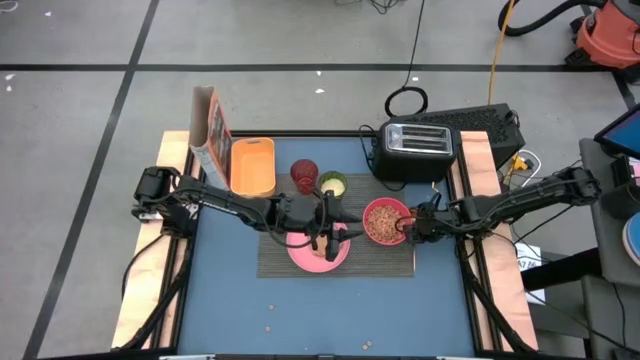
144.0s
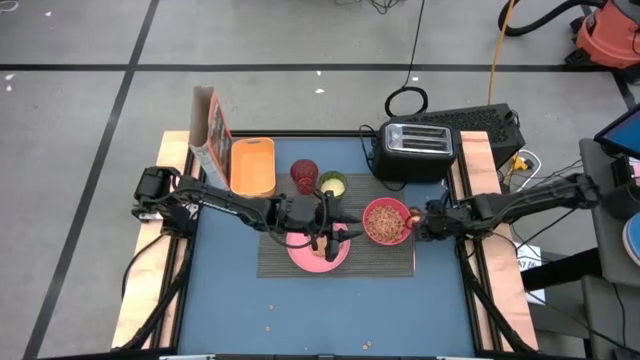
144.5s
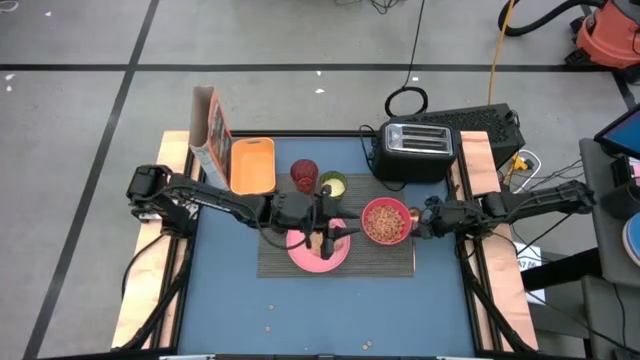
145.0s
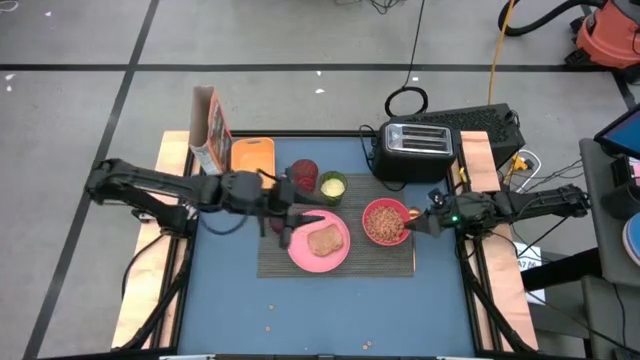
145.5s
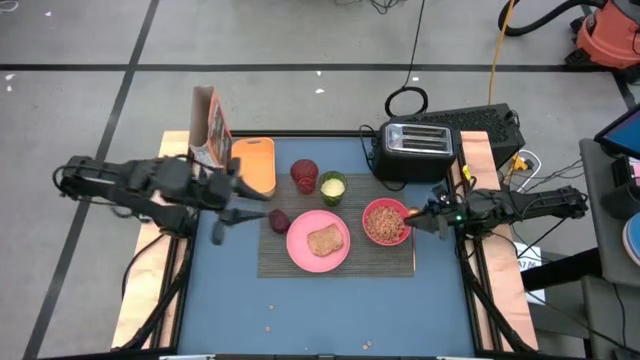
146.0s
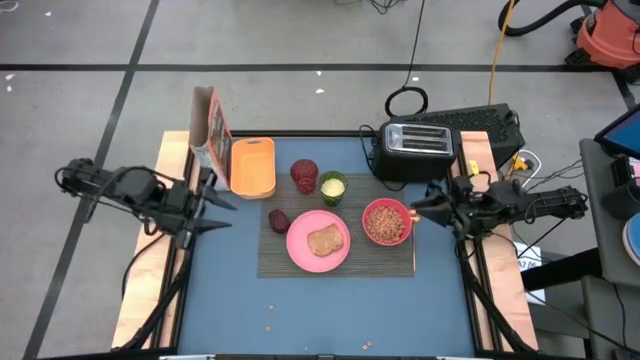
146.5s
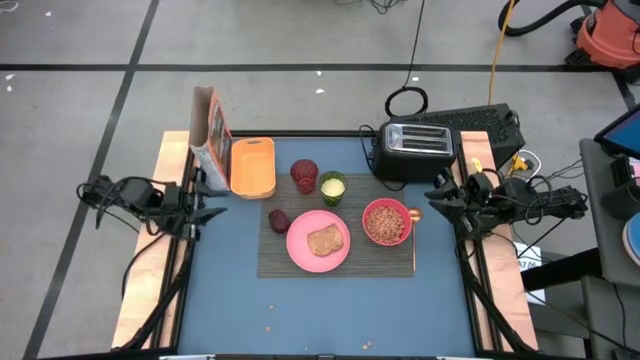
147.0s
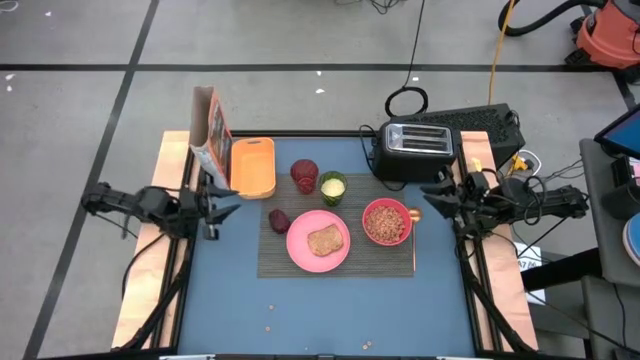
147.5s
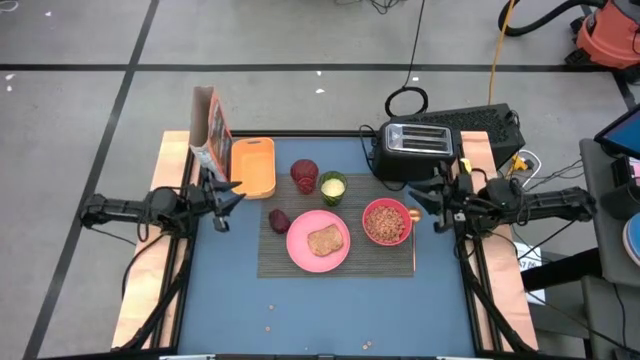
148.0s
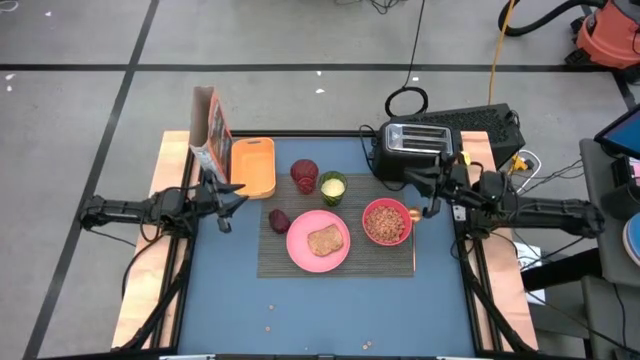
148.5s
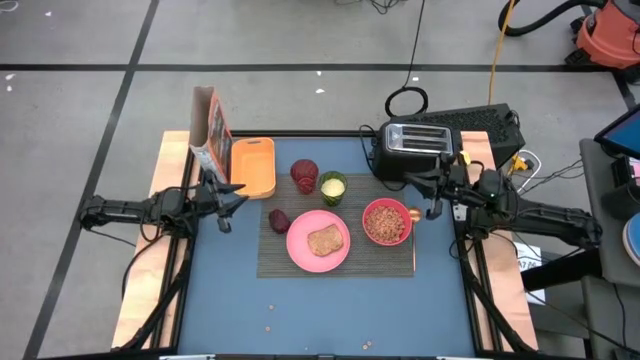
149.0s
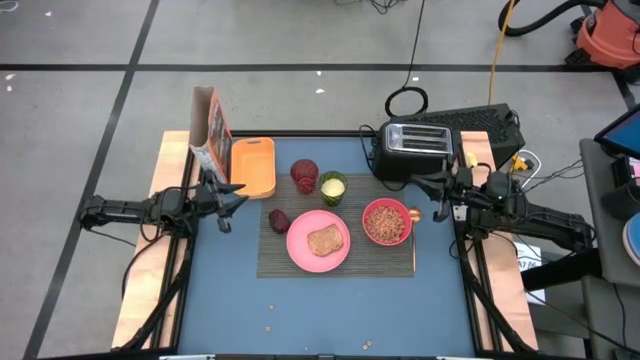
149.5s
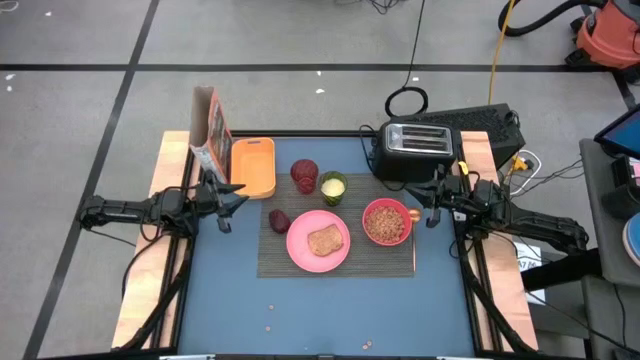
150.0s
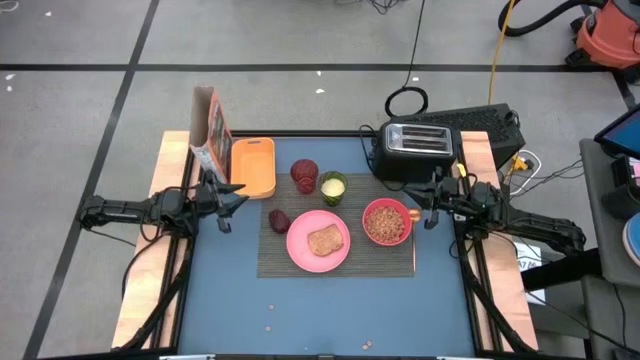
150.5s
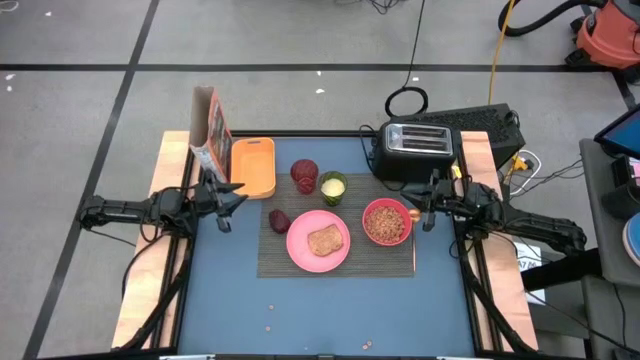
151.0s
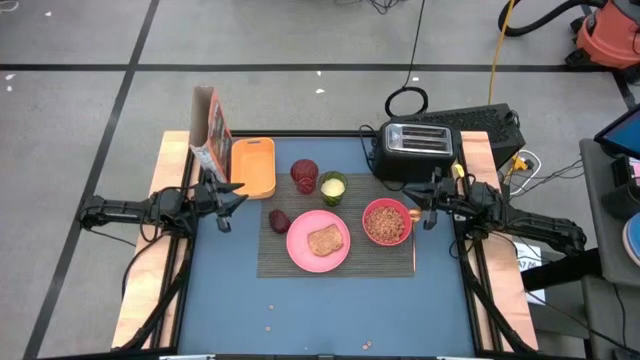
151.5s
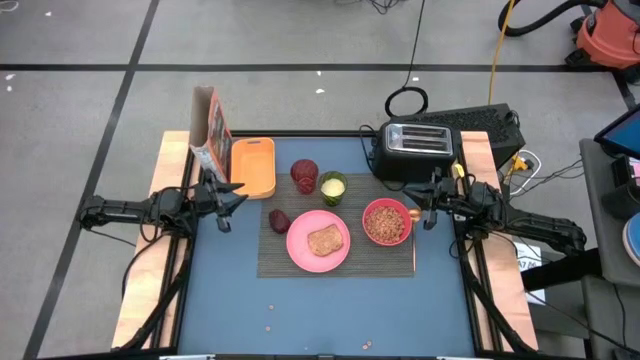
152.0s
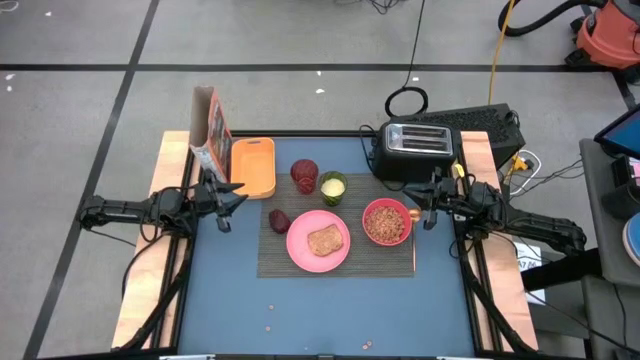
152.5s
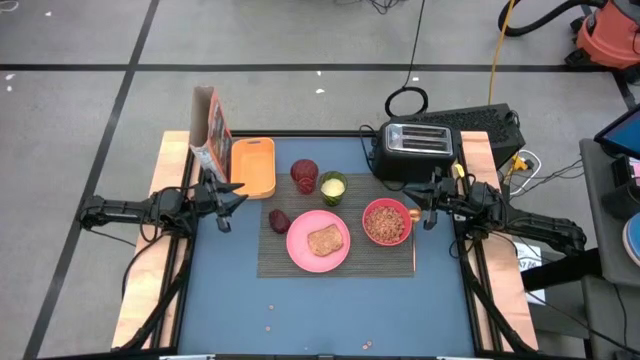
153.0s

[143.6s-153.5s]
Task: Arrange a breakfast setting
Return to Home Position

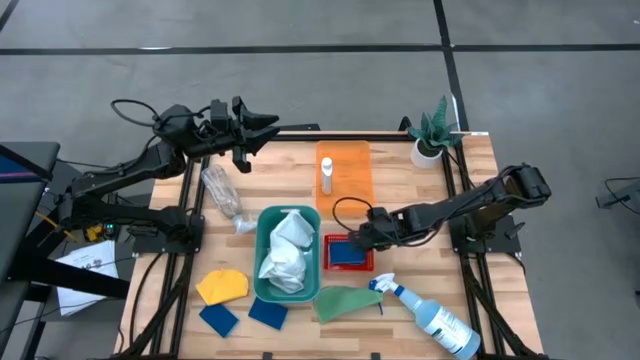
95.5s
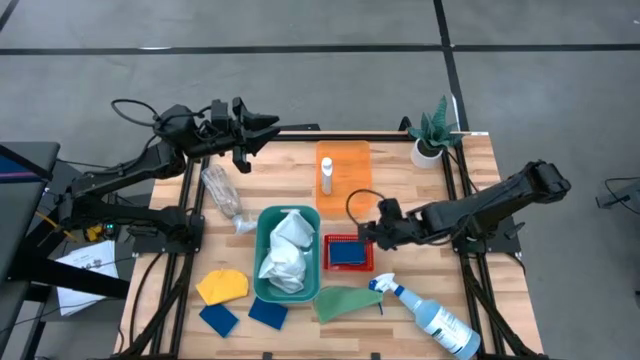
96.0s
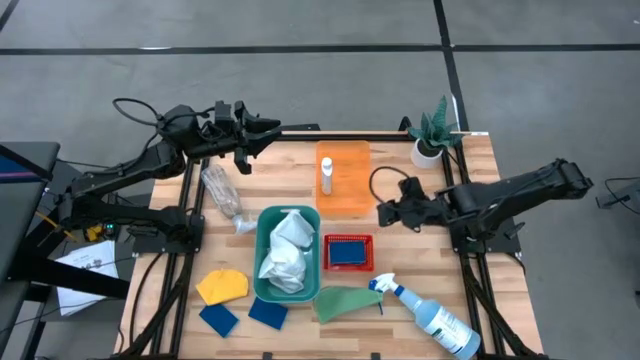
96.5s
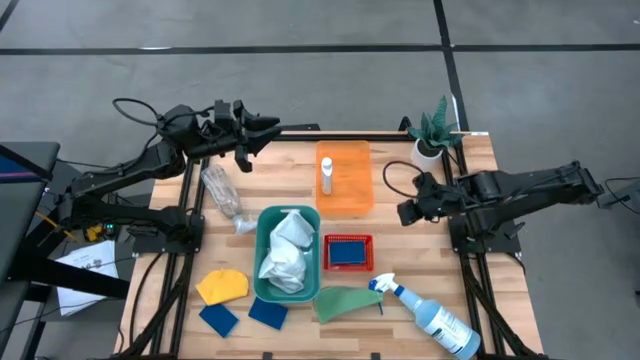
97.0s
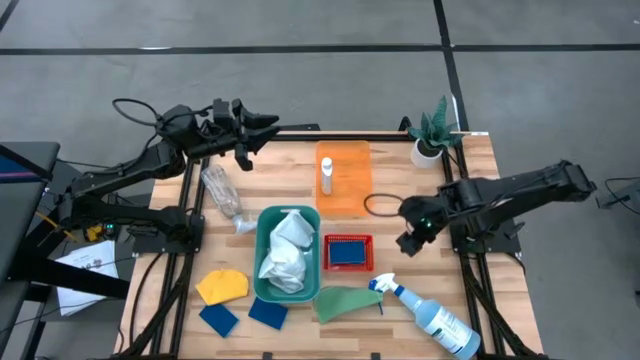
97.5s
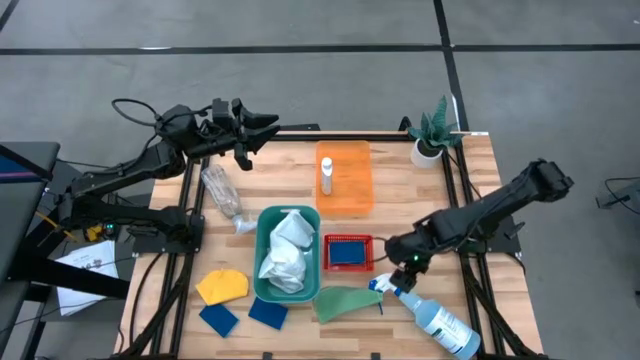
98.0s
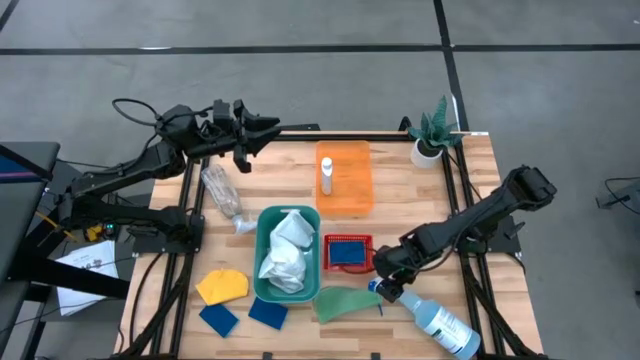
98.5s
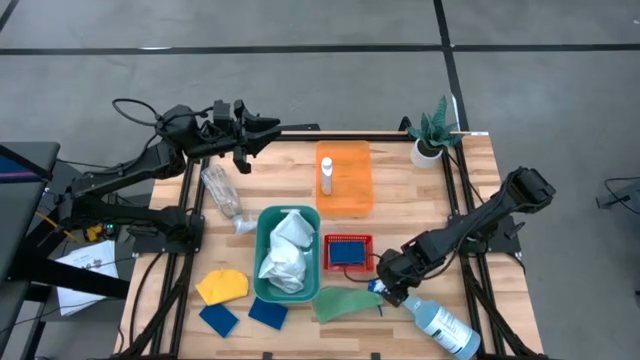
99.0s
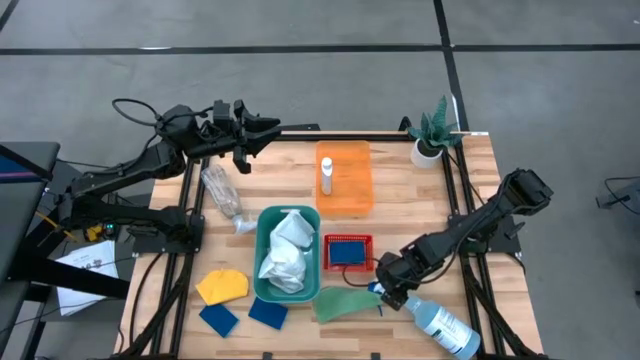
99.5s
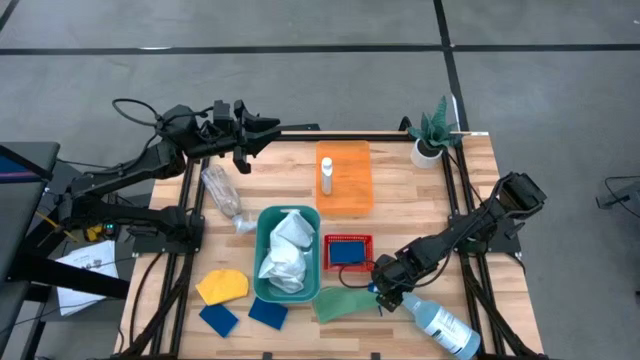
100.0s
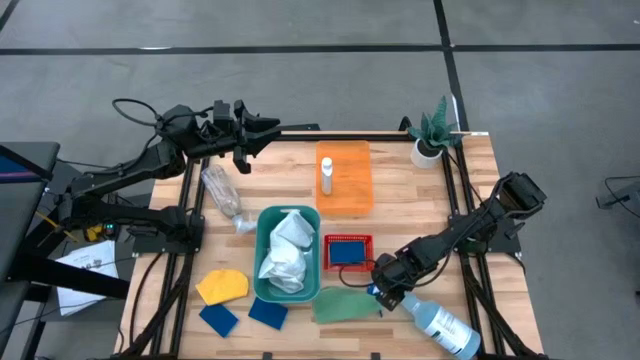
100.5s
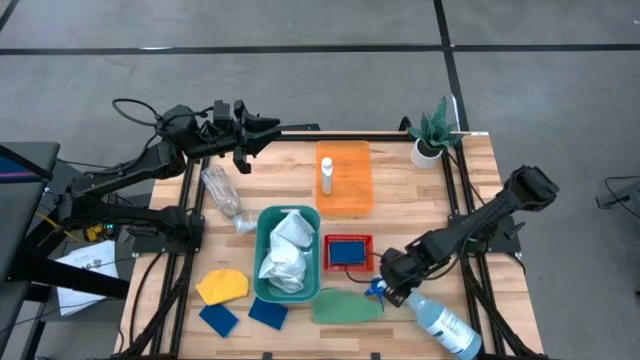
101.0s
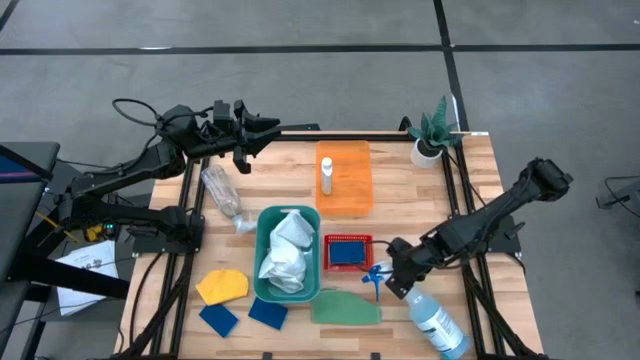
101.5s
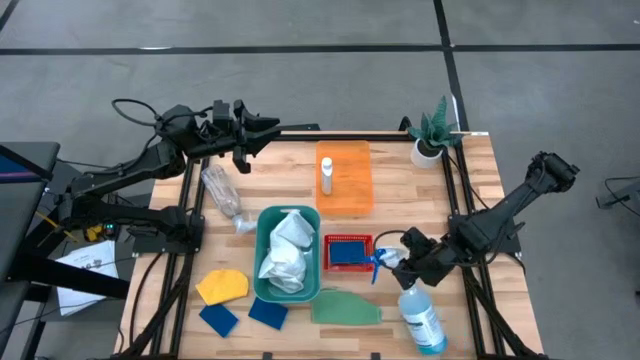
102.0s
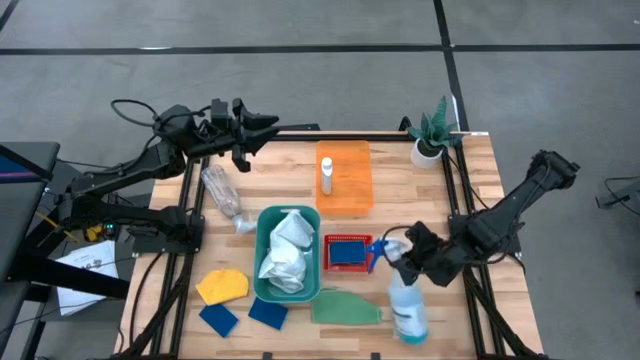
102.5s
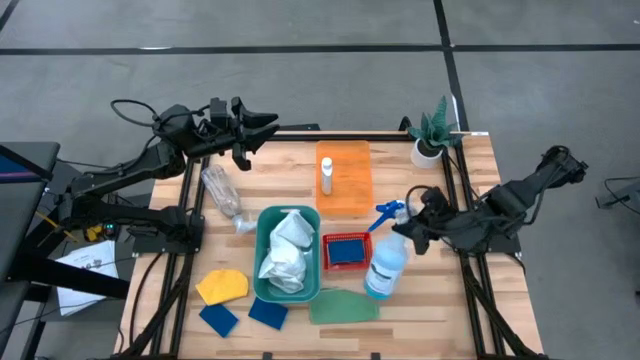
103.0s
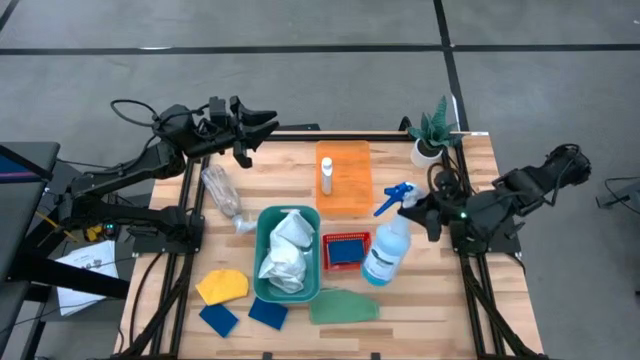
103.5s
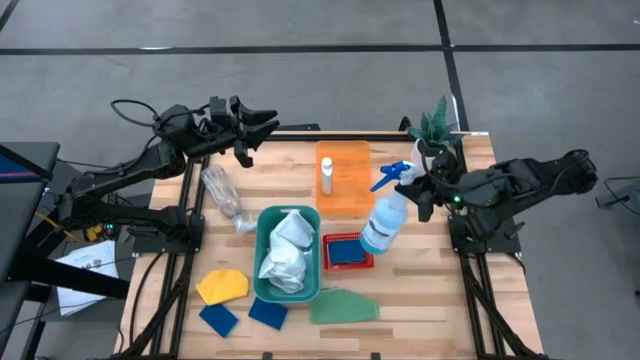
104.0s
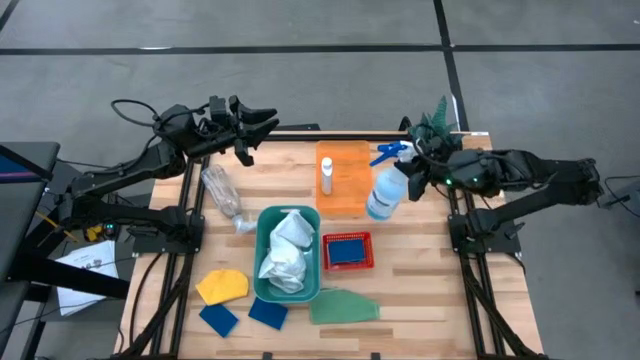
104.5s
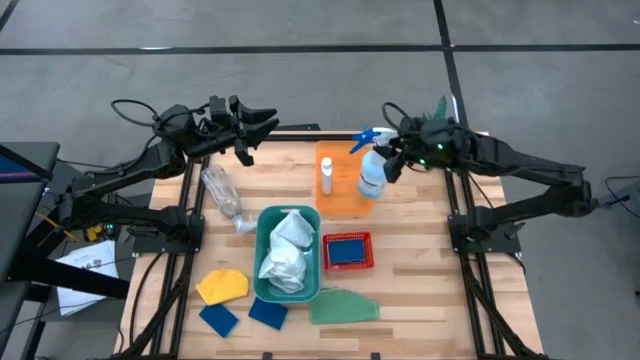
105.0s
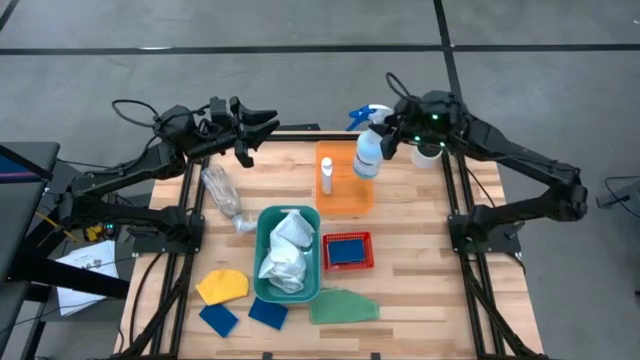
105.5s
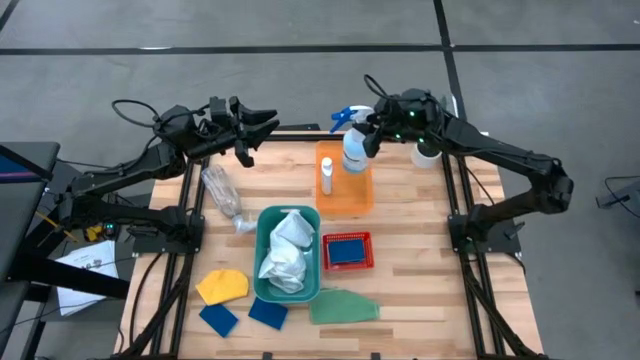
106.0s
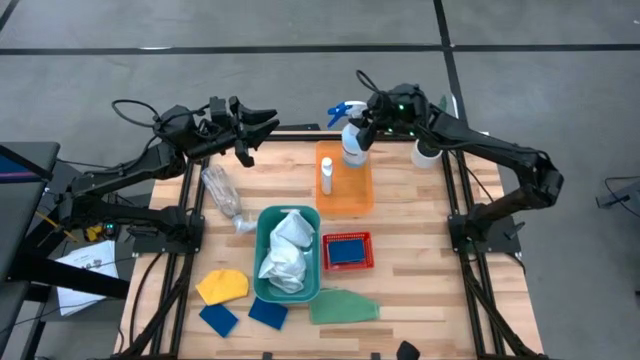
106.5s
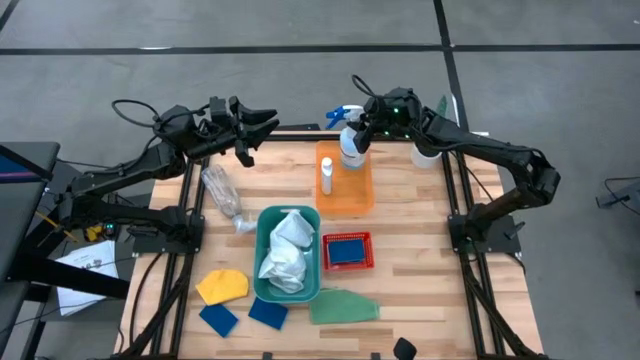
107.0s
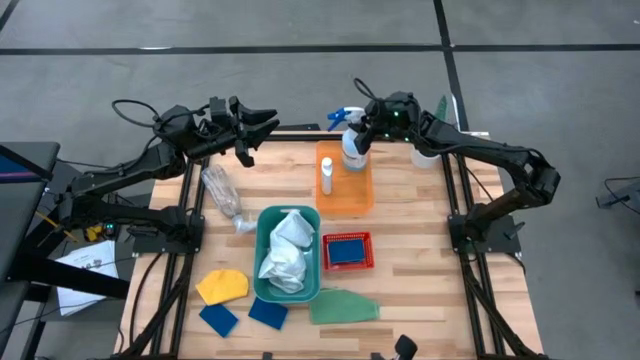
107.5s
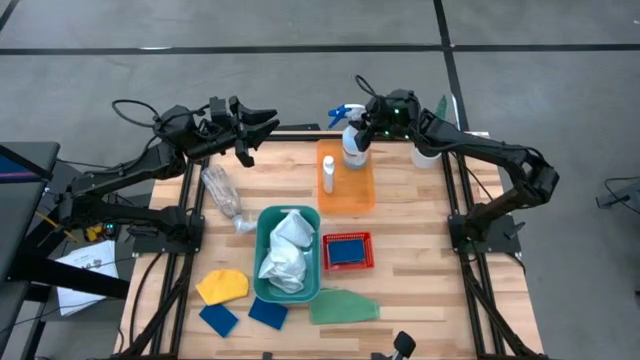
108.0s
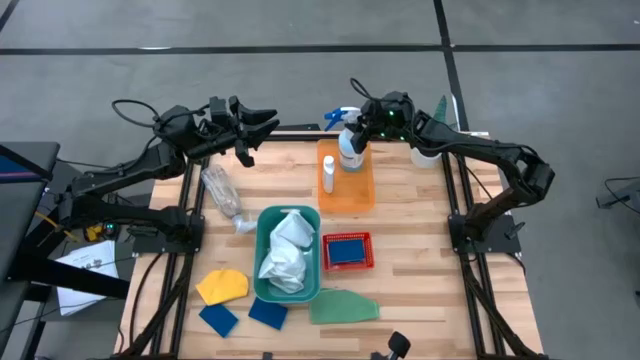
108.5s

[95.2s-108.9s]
Task: Pick & Place Kitchen Items
Put the blue spray bottle into the orange bin
